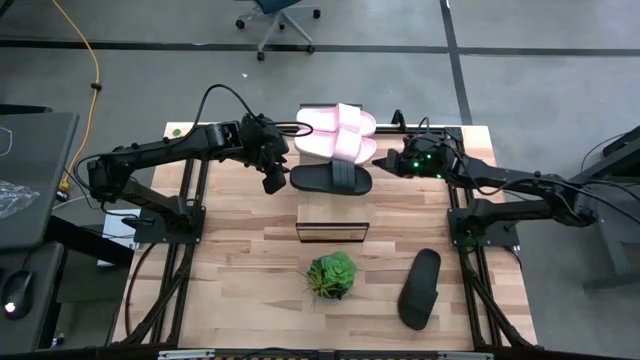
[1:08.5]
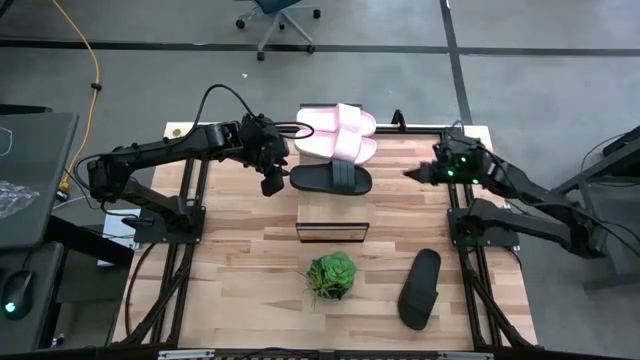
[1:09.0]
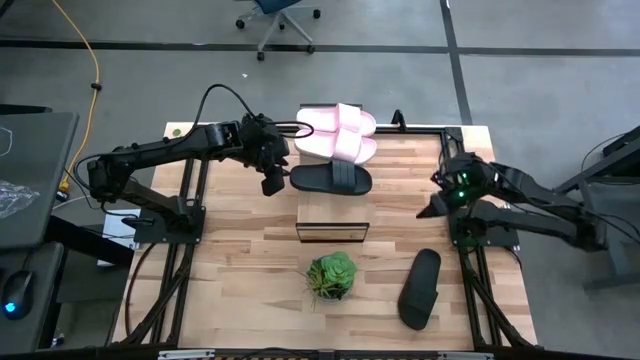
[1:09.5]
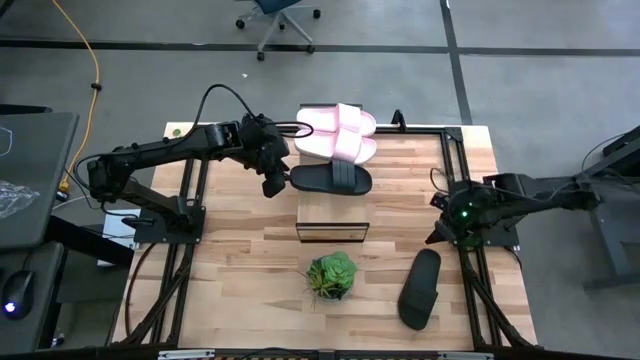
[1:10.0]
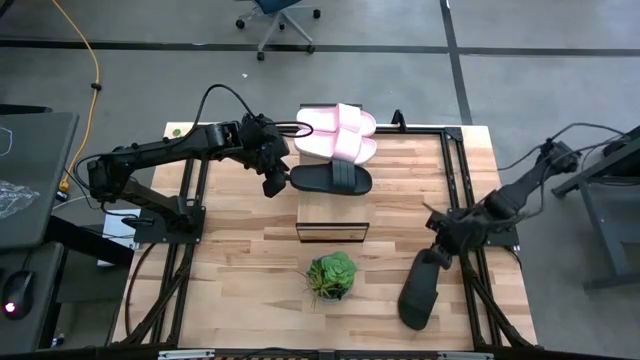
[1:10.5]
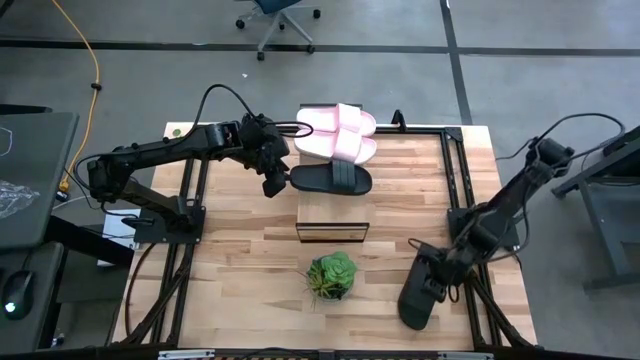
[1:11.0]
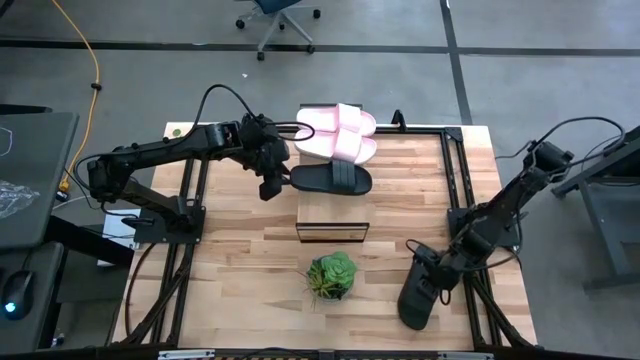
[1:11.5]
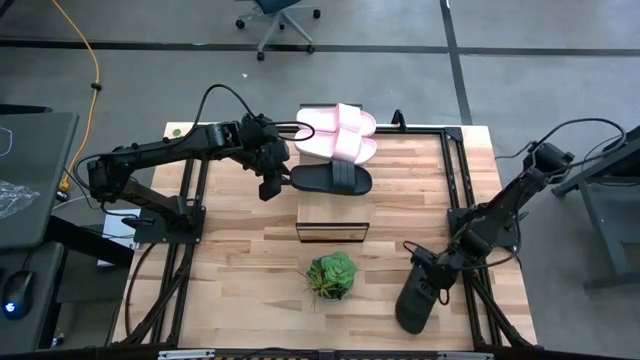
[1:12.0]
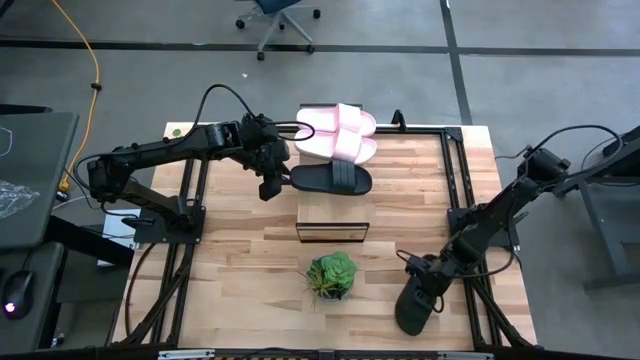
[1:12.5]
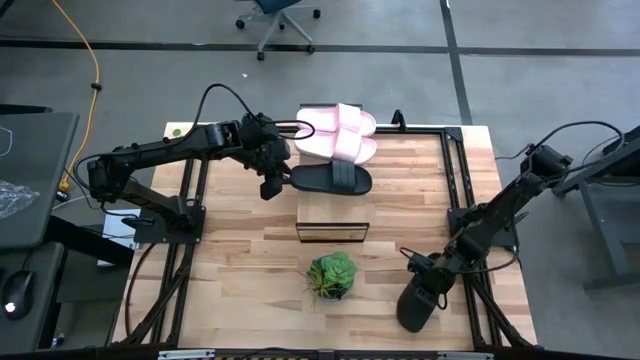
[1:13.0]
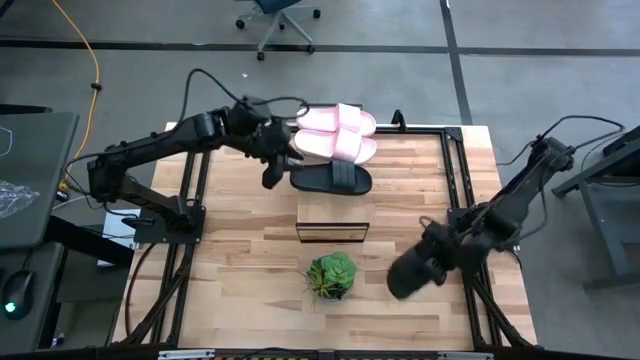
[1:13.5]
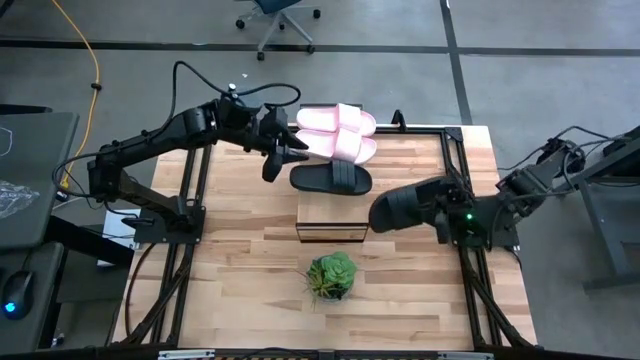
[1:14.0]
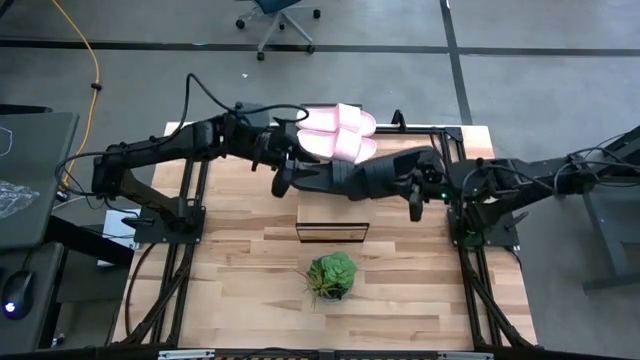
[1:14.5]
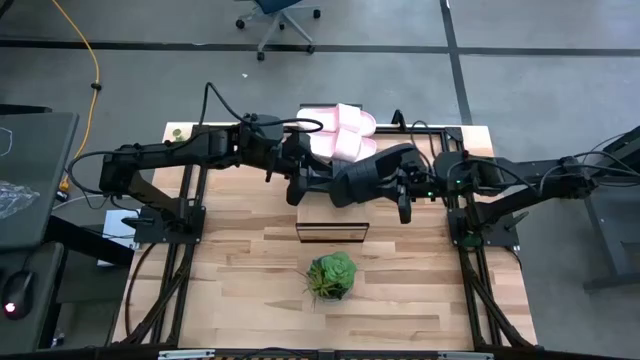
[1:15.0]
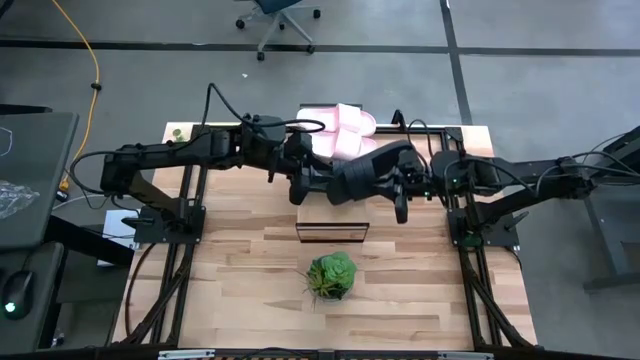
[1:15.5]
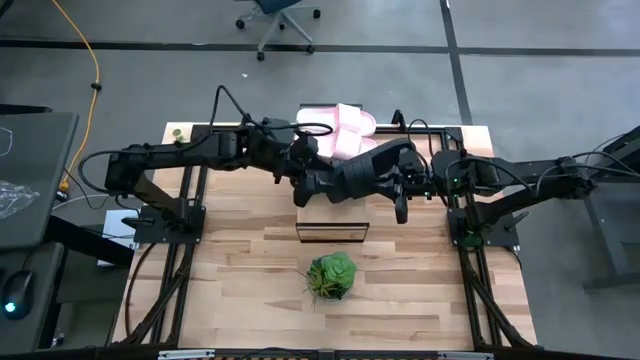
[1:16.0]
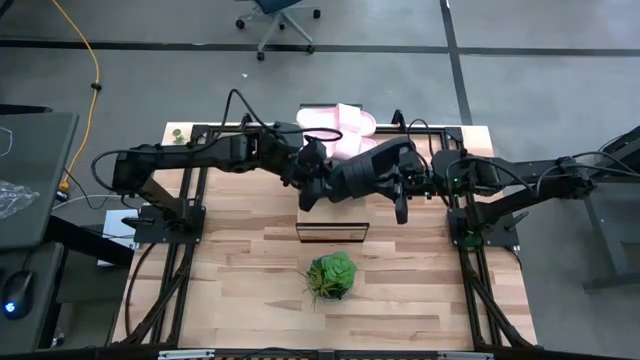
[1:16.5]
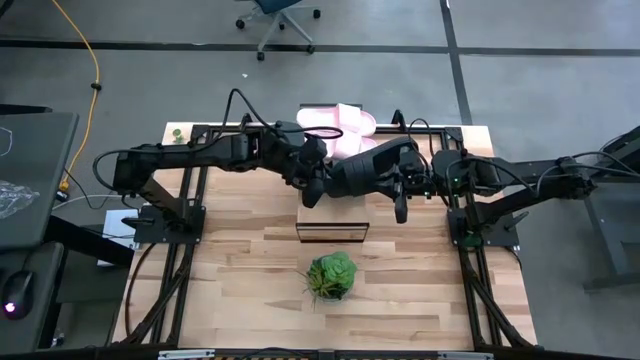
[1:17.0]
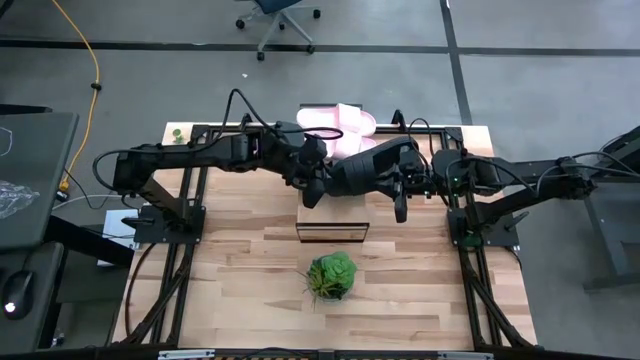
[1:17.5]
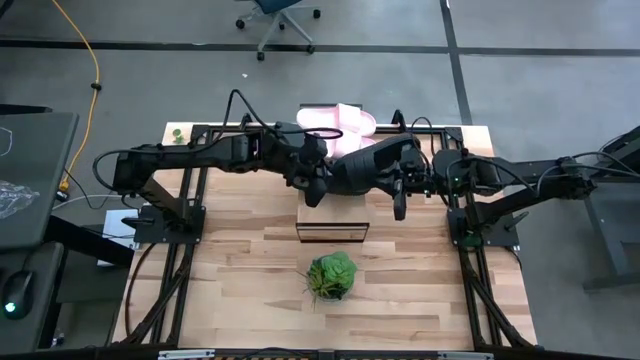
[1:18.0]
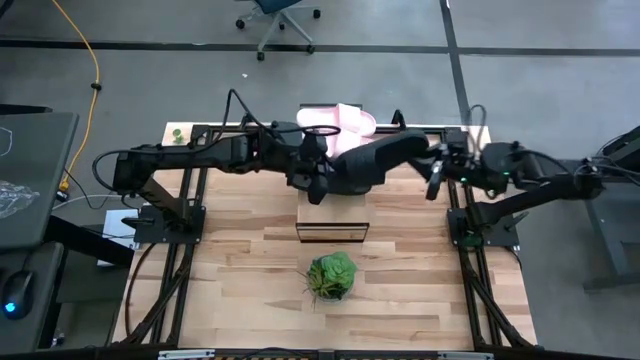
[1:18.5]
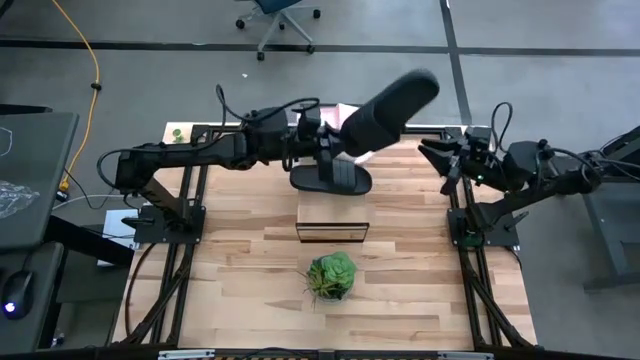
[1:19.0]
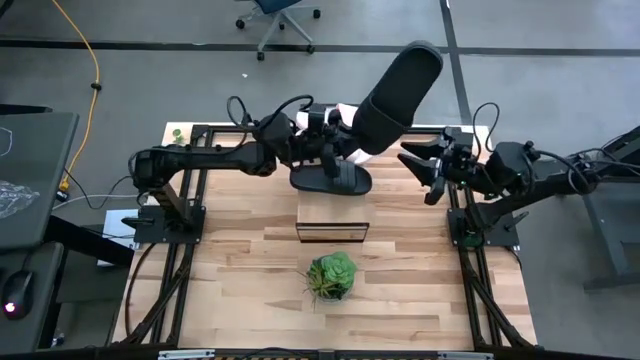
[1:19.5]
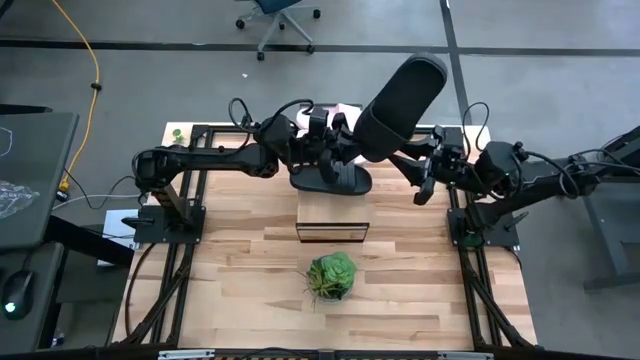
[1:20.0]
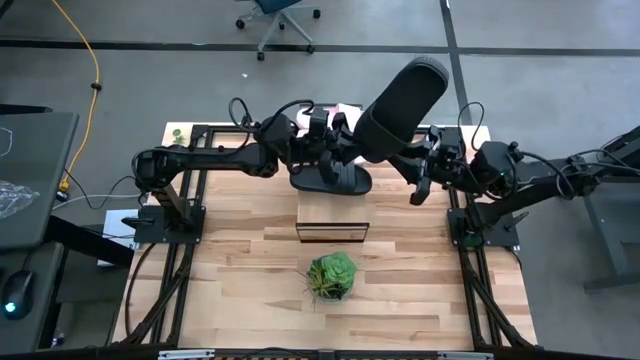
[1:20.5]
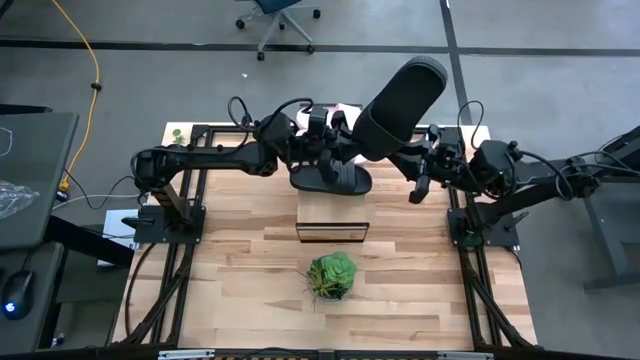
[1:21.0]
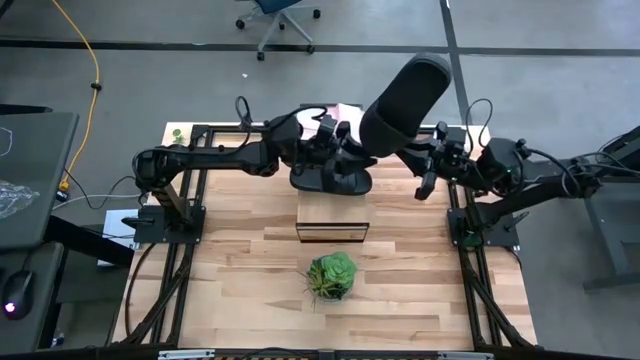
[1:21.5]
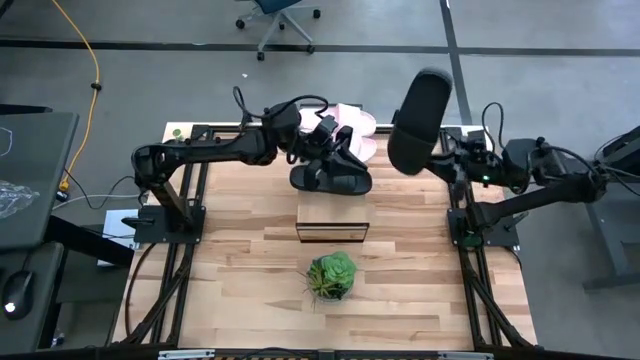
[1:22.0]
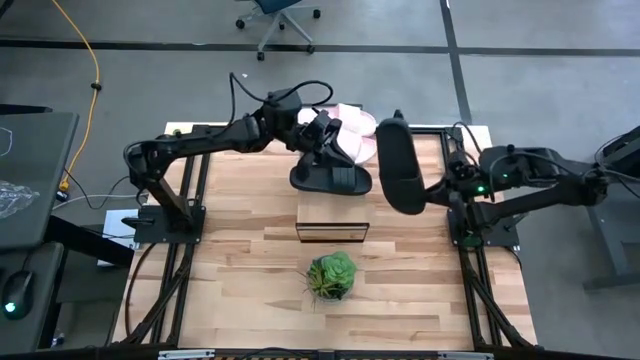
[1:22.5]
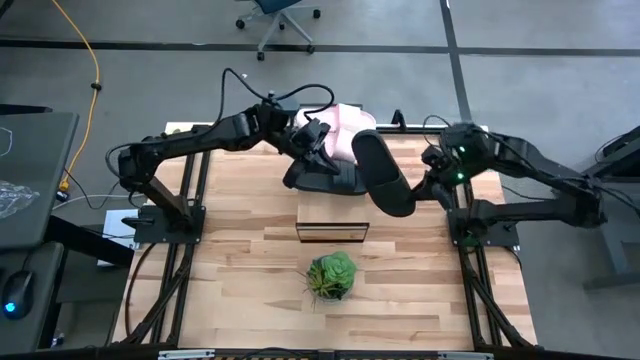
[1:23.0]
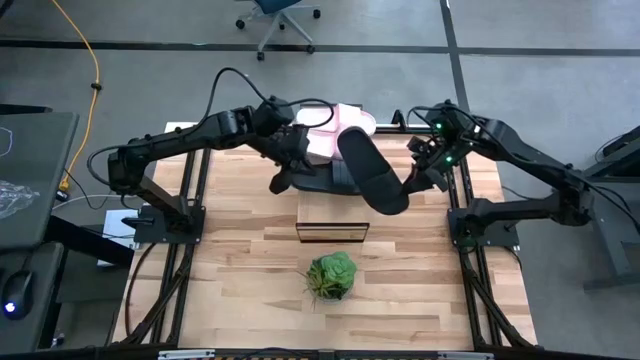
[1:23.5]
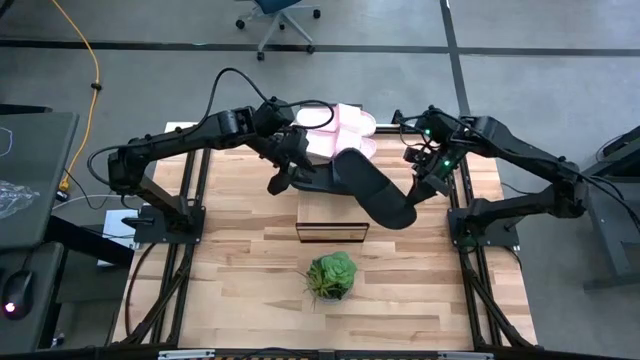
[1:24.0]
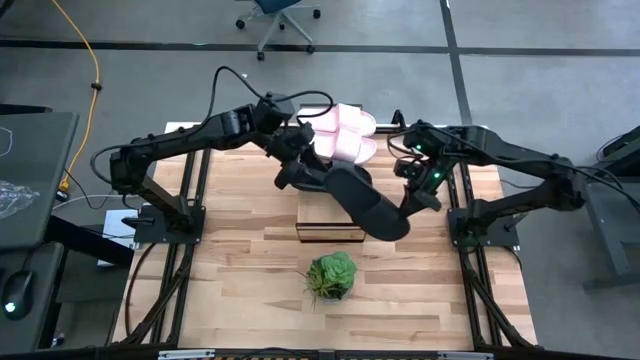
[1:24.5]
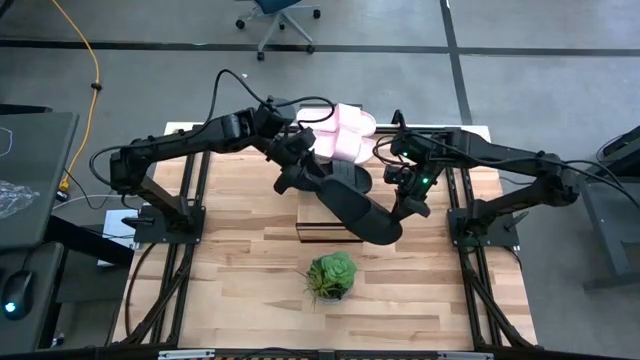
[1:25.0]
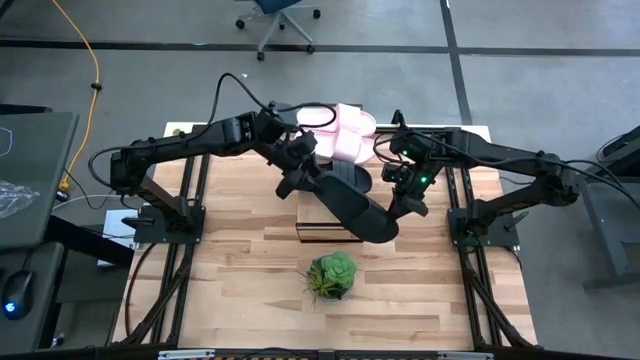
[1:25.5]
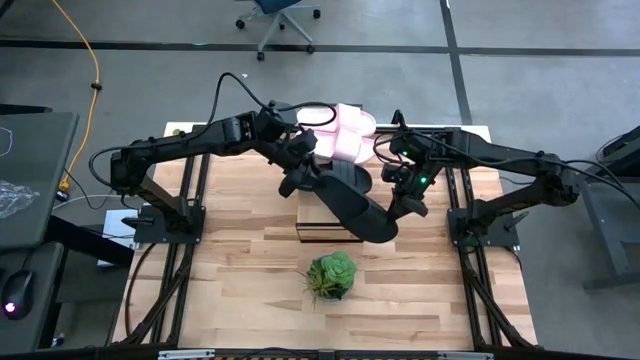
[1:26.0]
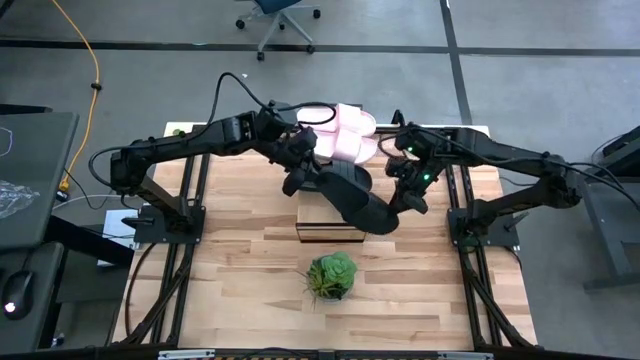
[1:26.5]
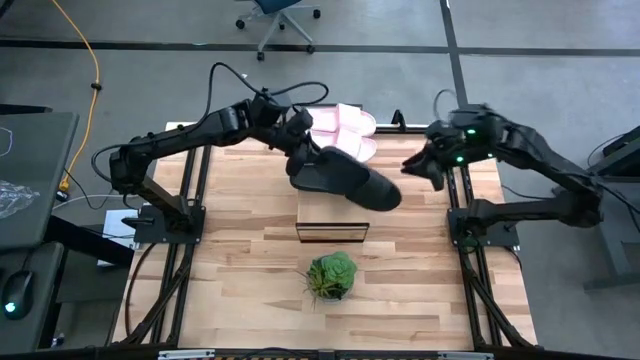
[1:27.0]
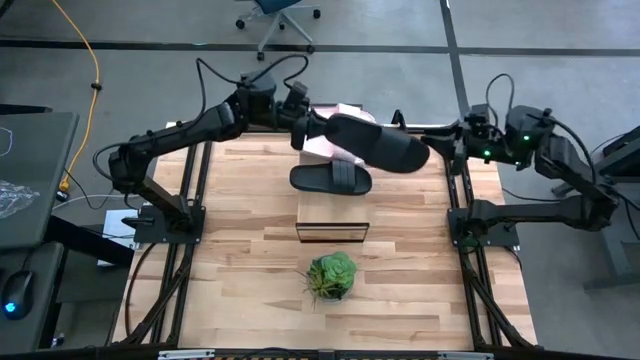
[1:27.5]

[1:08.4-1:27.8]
Task: Pick and place slides into the shelf
Put the black slide on the shelf
